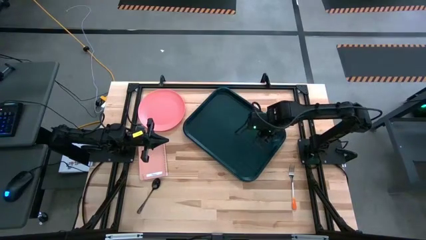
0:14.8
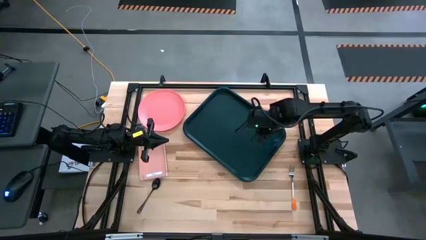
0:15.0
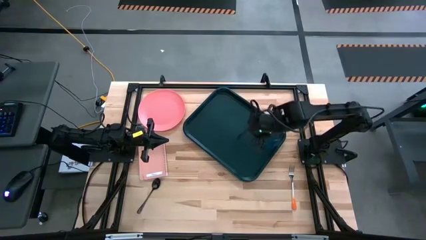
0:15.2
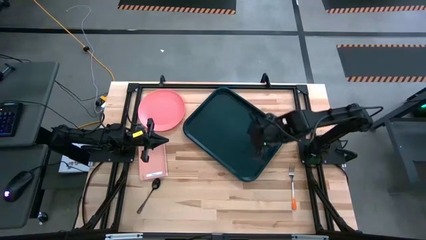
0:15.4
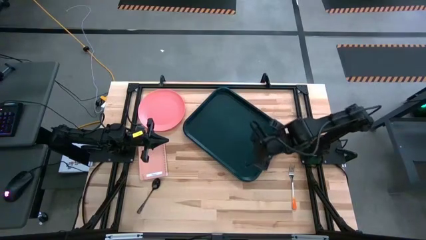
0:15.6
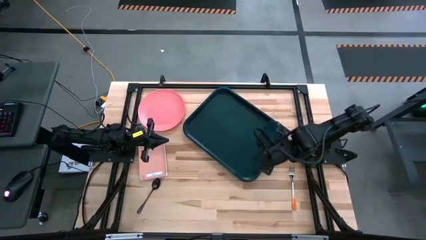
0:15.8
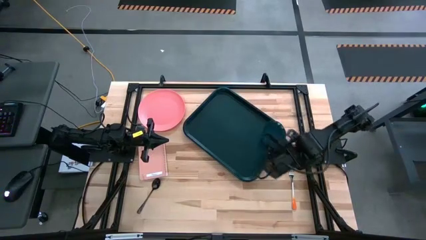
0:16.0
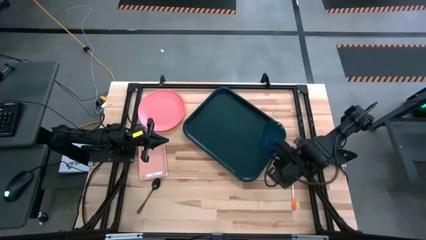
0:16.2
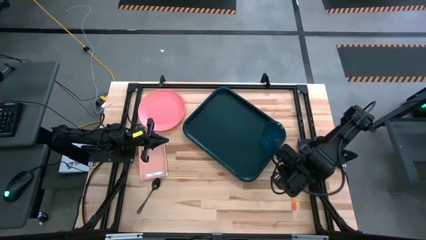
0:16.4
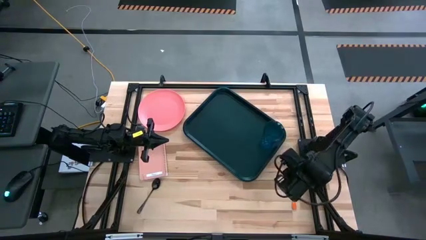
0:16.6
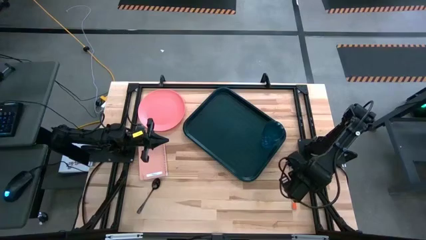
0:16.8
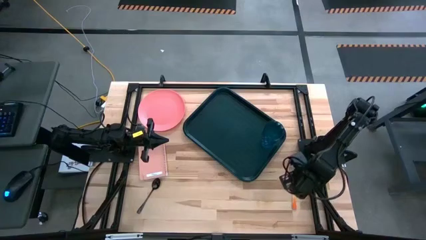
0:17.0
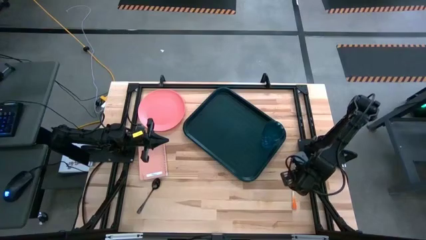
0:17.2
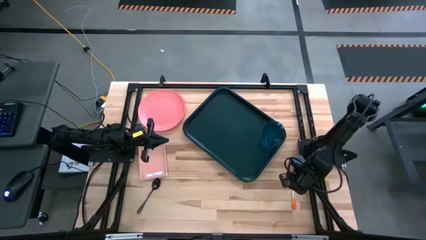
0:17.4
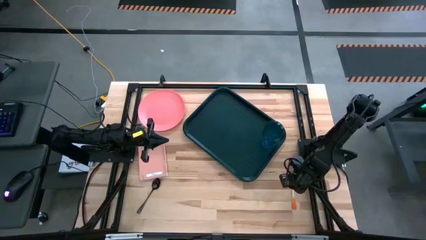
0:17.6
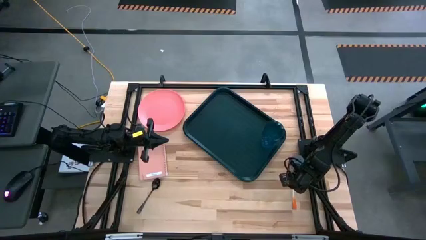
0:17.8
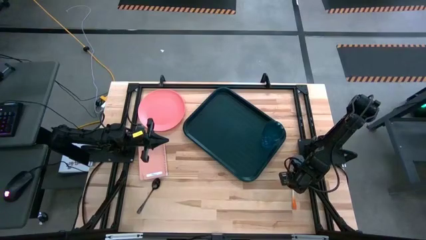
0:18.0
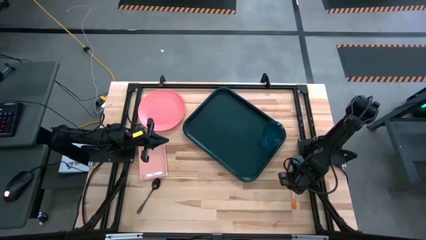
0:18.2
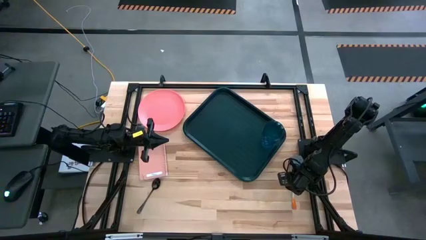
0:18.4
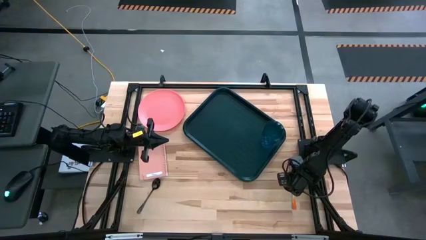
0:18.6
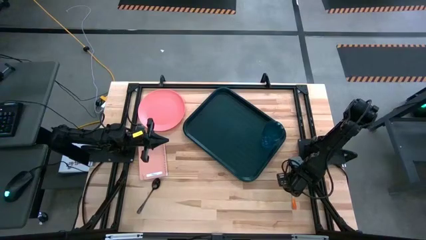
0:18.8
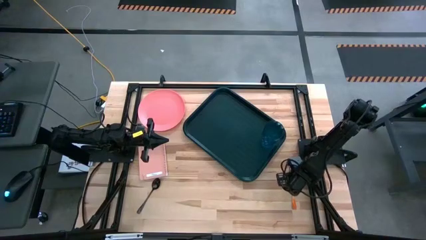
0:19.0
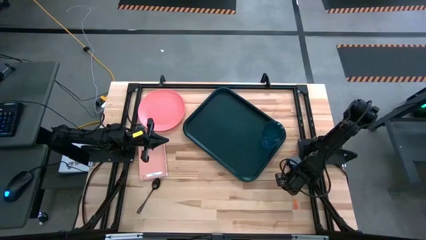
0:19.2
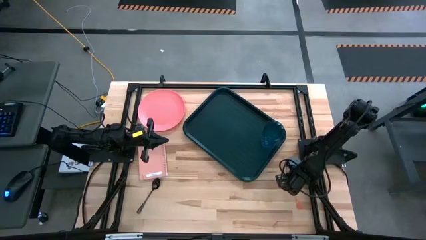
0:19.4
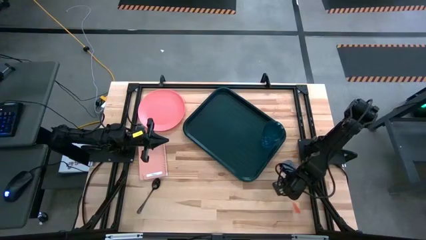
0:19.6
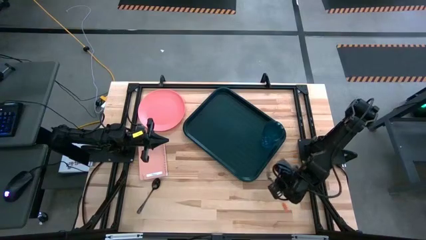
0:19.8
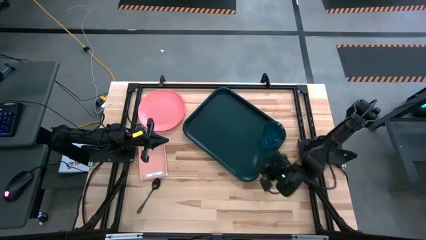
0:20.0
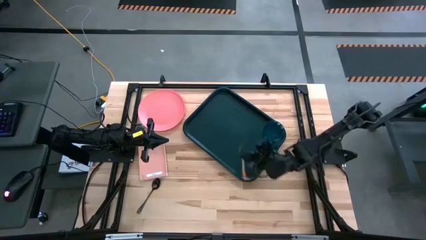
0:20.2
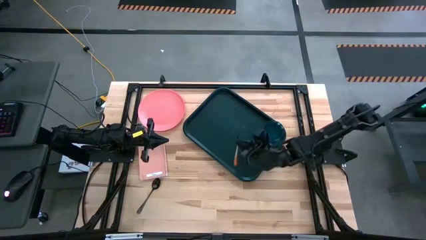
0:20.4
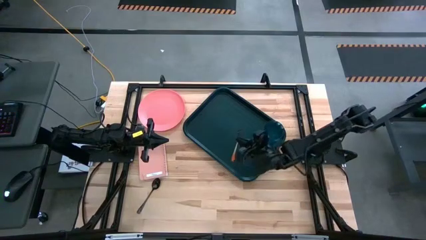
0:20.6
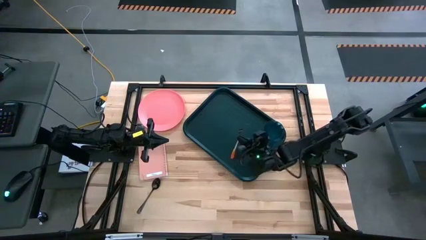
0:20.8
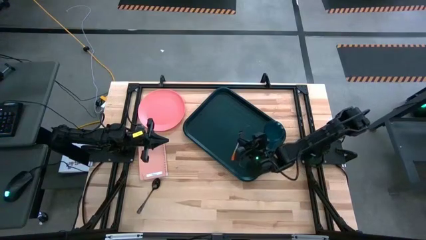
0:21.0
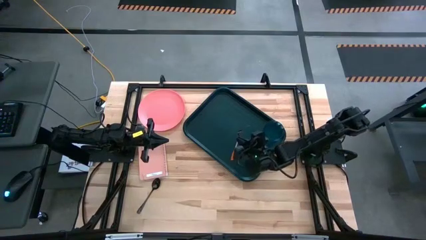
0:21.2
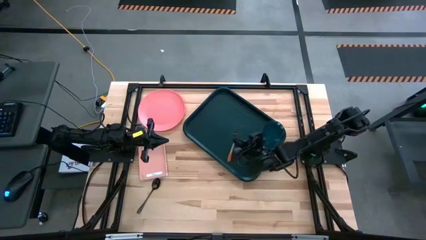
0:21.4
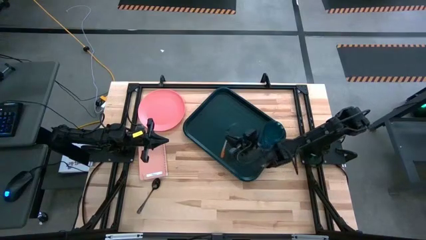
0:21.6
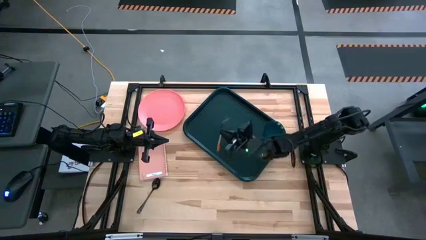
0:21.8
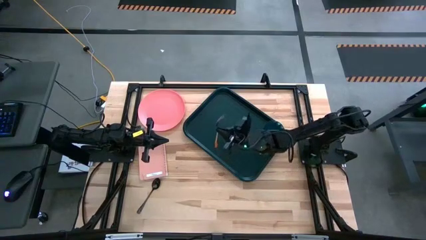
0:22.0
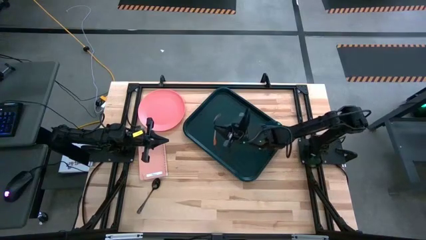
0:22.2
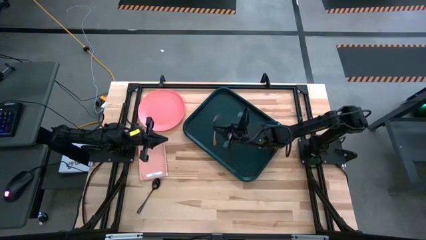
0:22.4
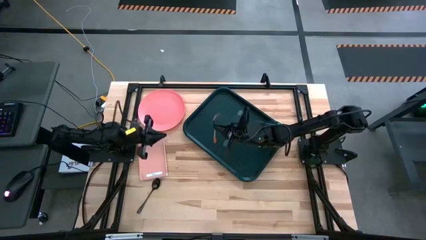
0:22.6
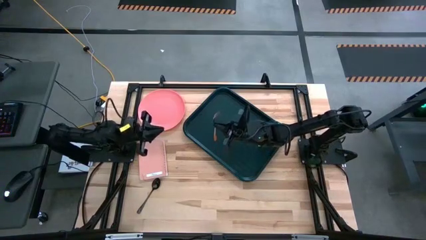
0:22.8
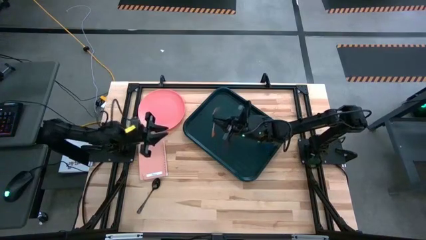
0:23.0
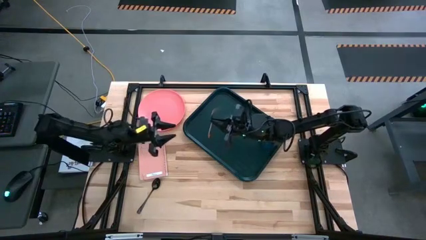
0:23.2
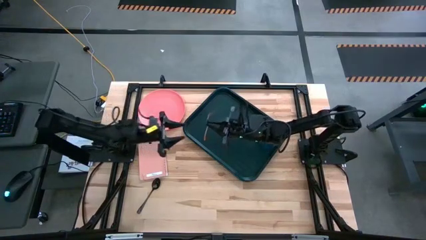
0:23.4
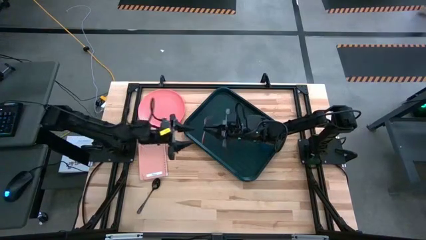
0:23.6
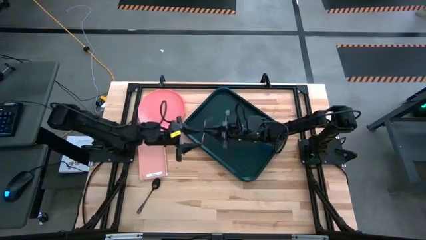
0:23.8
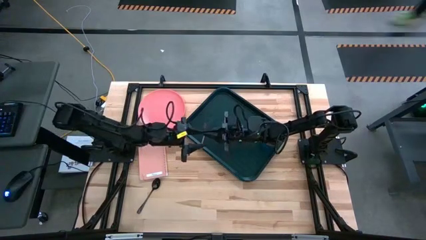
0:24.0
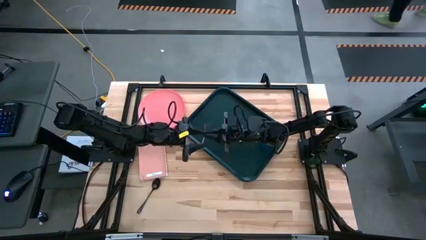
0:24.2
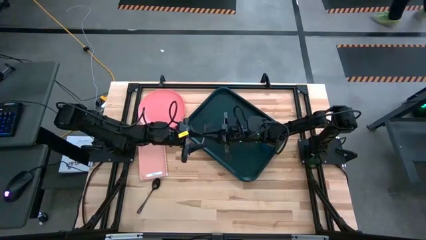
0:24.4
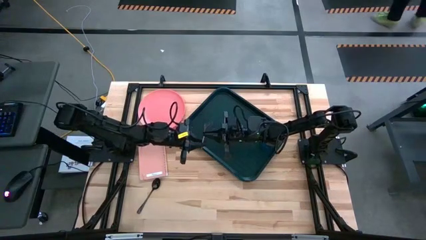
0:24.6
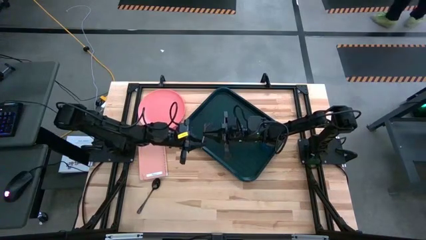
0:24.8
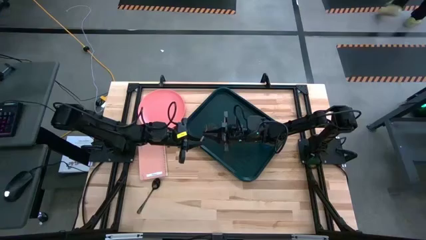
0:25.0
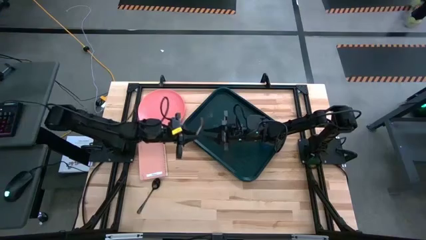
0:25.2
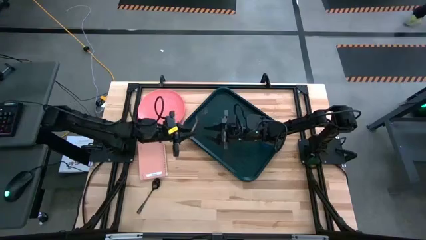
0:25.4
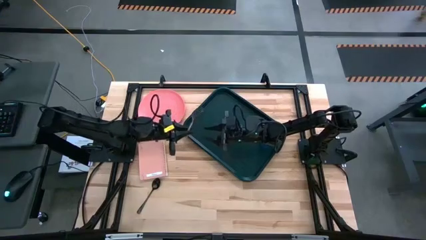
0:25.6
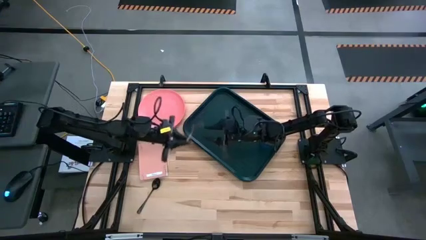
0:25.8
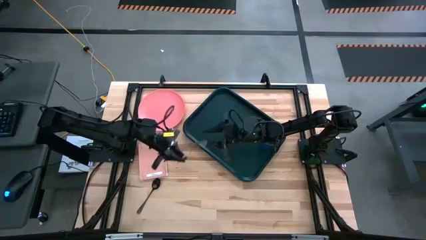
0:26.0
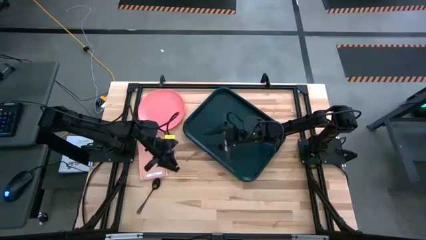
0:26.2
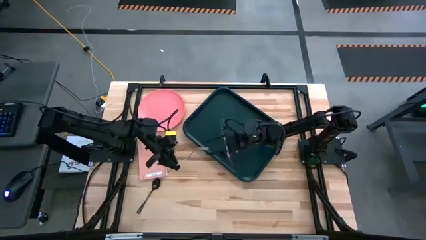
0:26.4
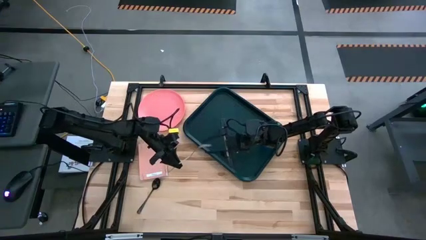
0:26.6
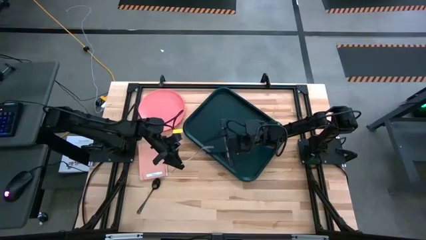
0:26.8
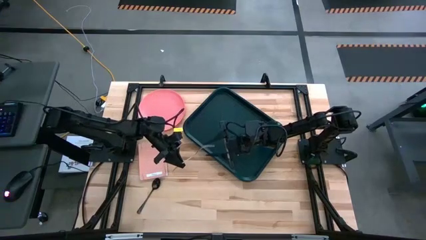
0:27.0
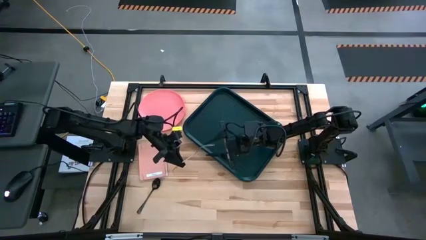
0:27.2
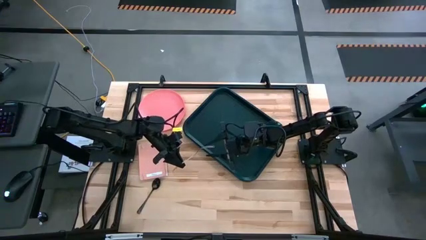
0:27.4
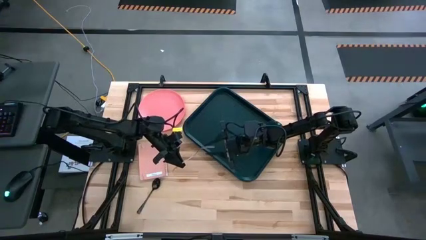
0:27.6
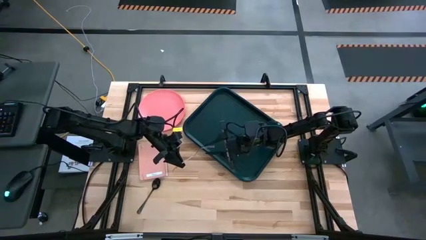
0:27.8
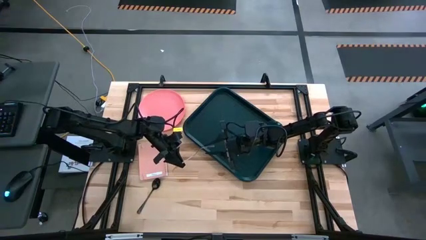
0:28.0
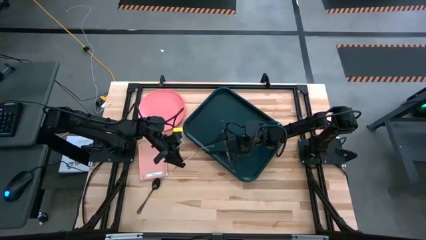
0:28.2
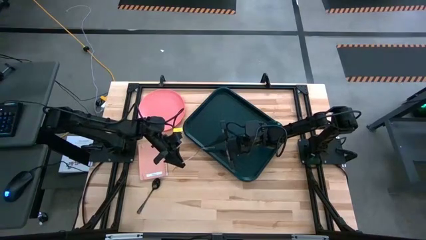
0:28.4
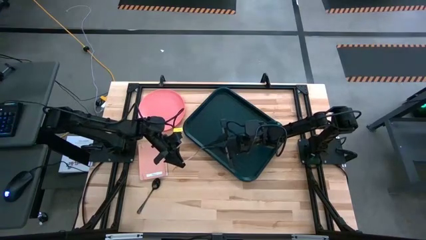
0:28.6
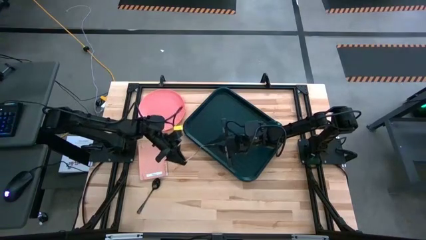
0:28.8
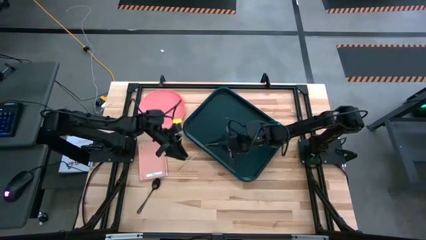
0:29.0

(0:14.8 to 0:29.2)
Task: Pick and place plate/cup/fork/spoon on tray
Put the orange fork on the black serving tray to the left
